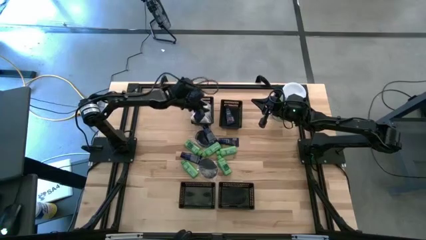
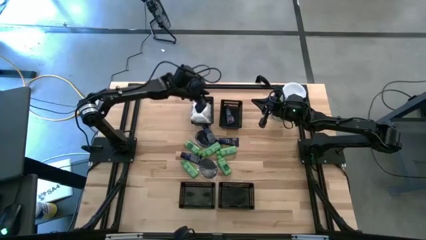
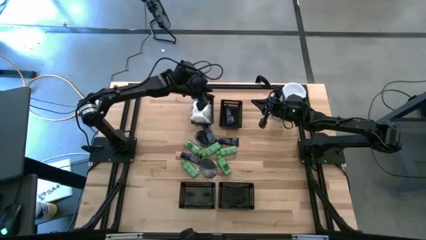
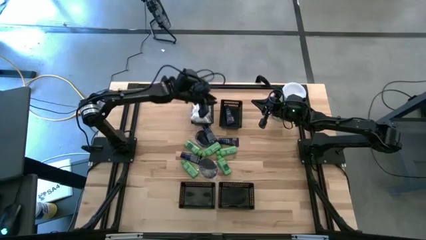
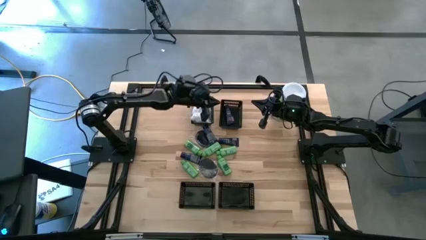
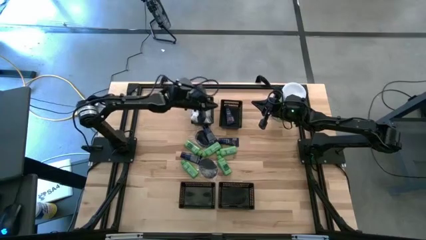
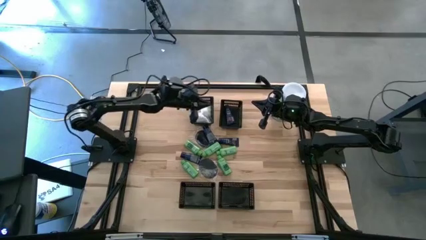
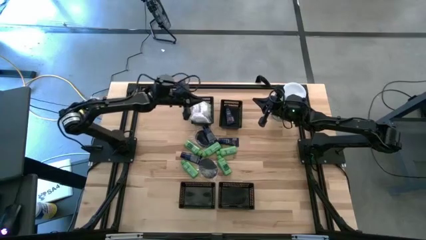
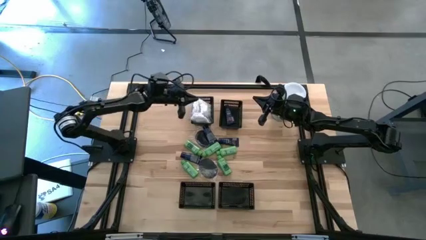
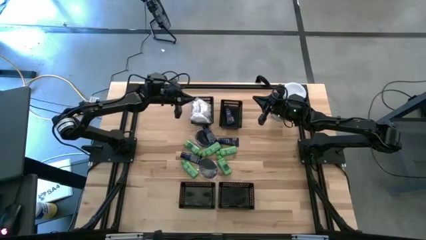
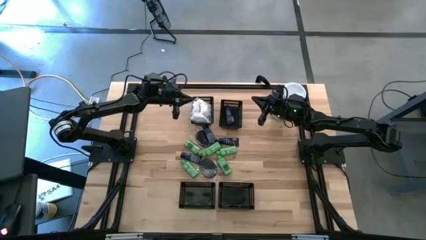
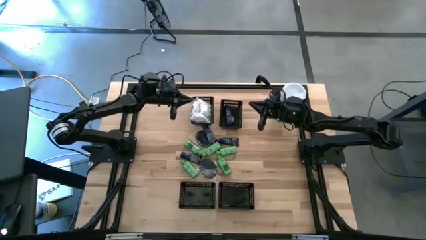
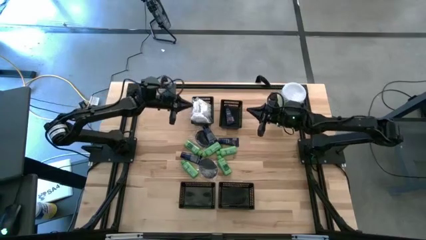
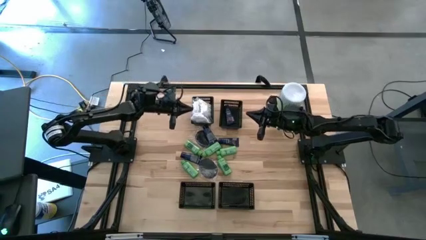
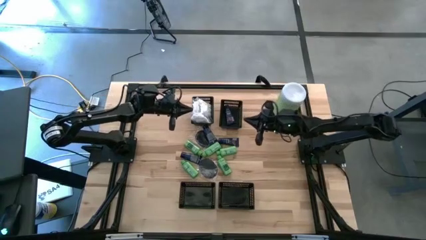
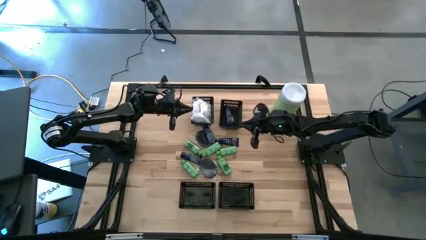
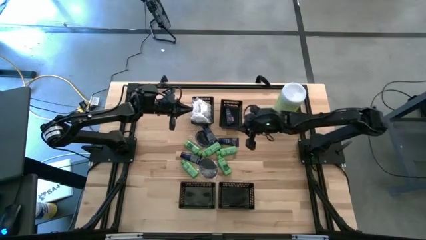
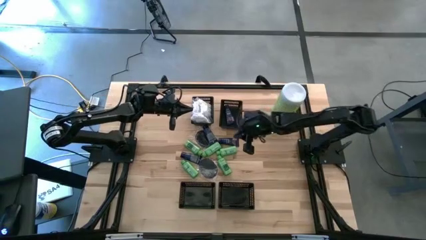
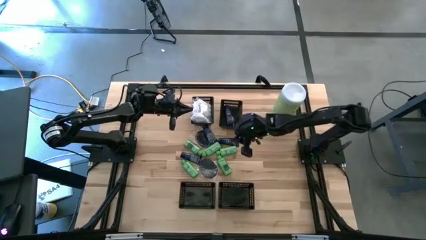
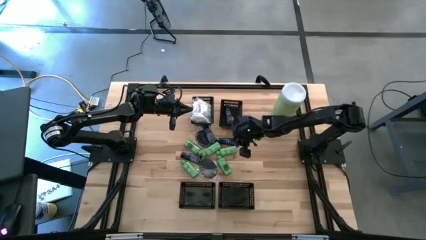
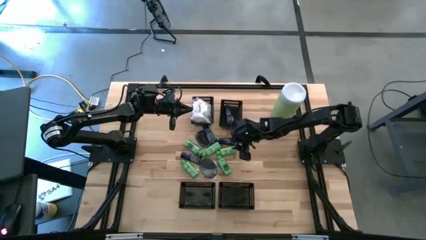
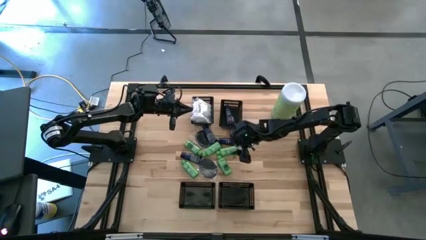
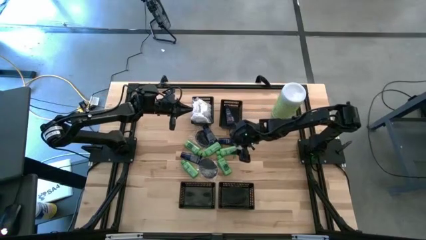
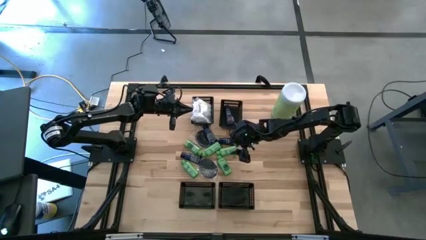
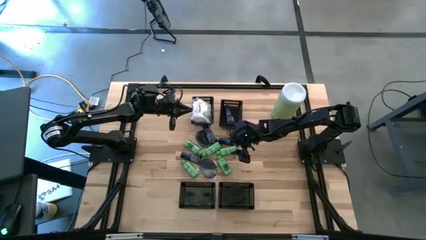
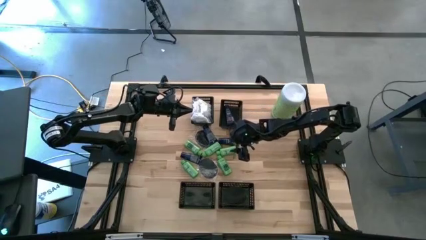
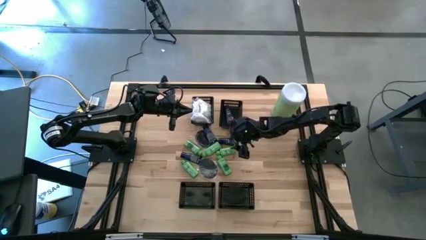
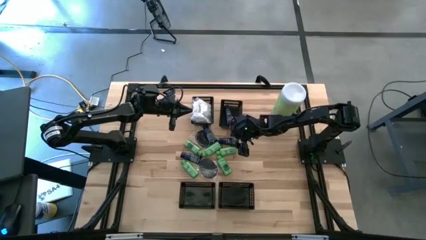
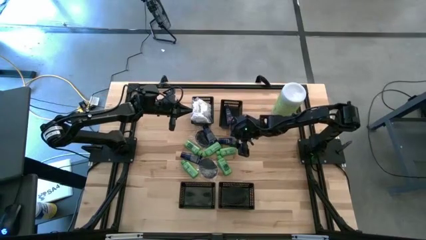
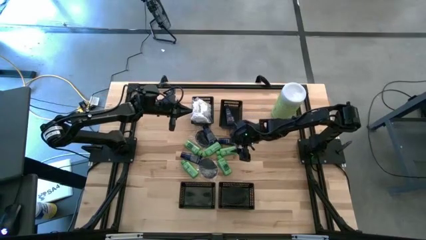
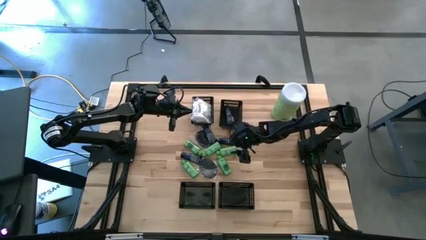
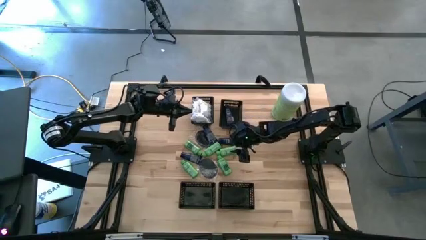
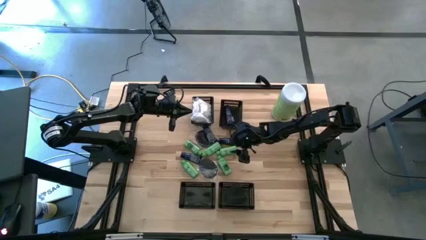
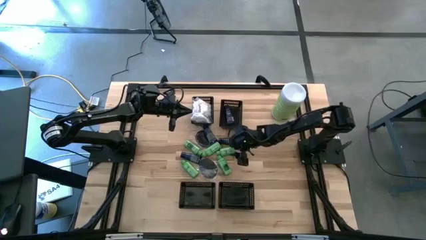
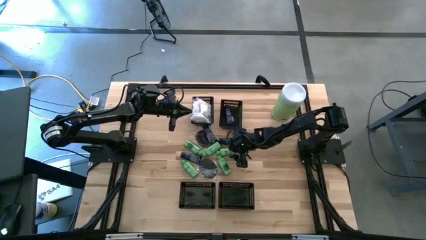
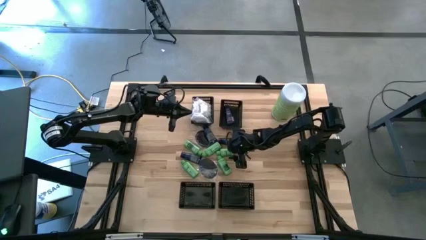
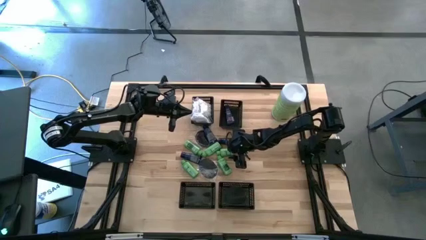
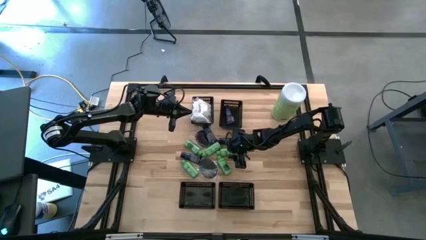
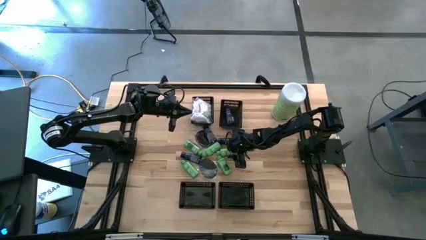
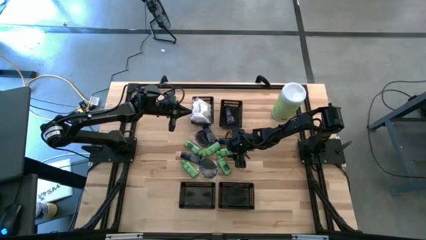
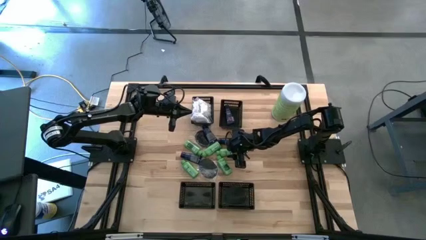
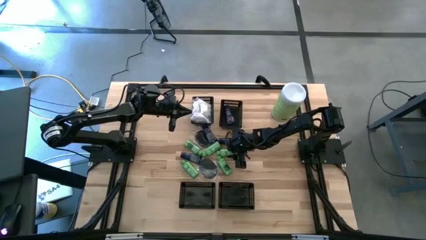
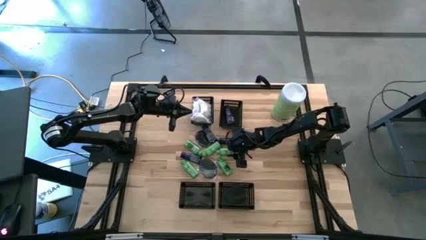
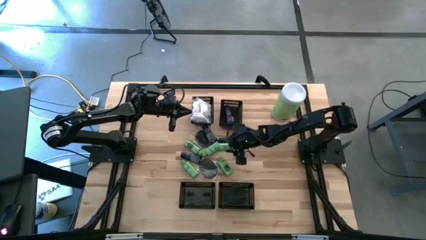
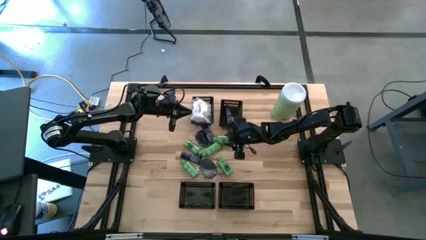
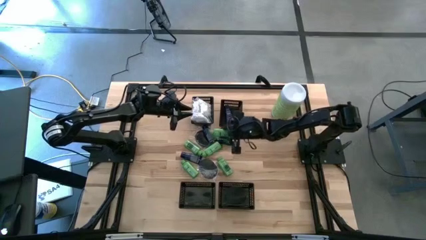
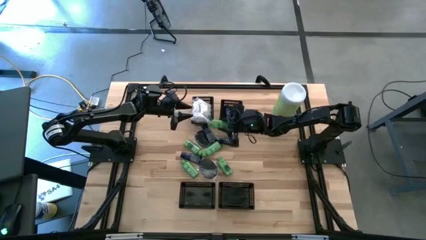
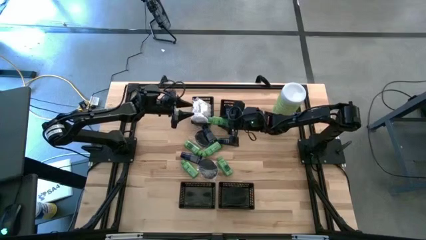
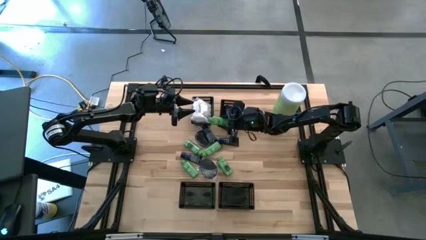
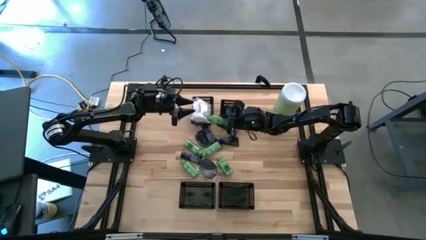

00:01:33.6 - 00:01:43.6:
Task: Pick & Place Travel size toiletries
Put the green shampoo into the bottom left black bin

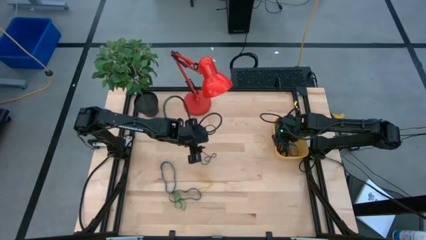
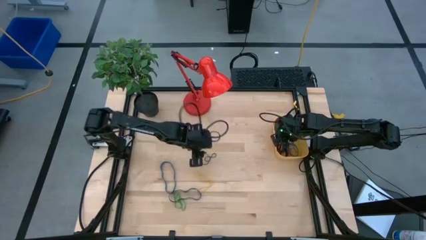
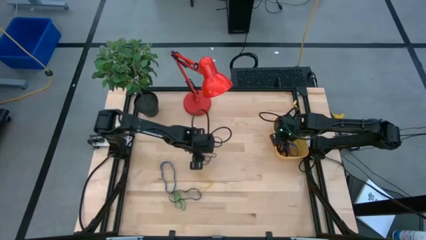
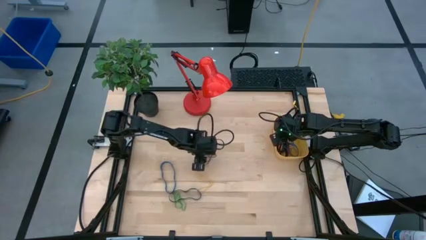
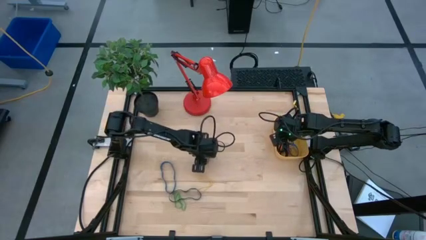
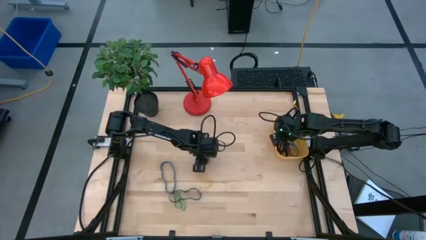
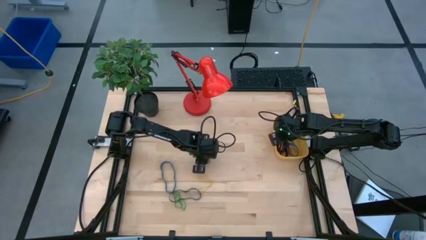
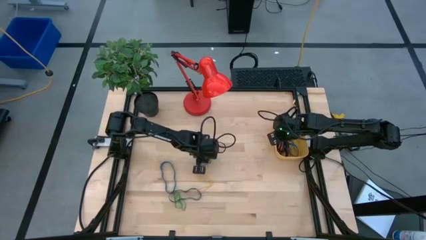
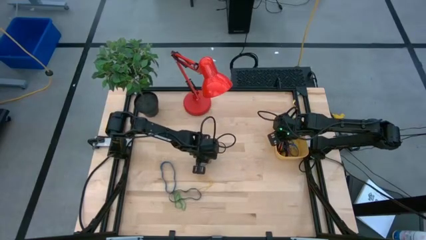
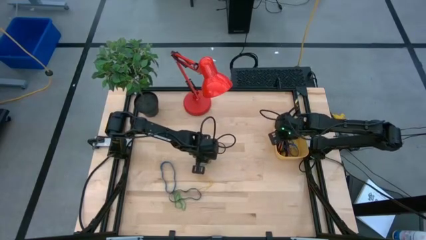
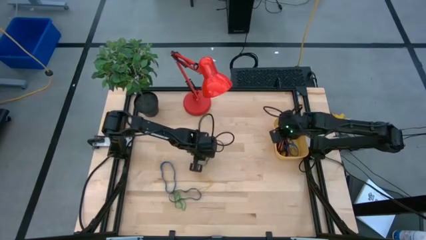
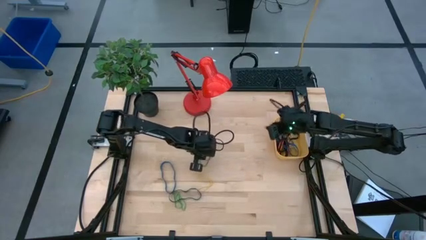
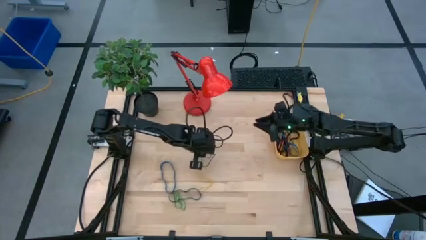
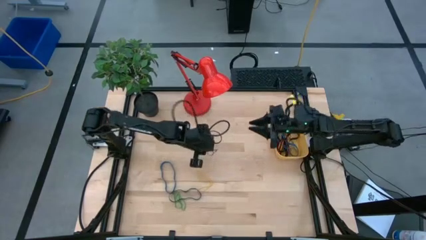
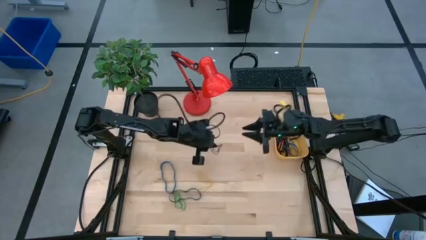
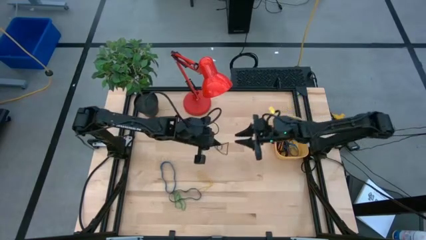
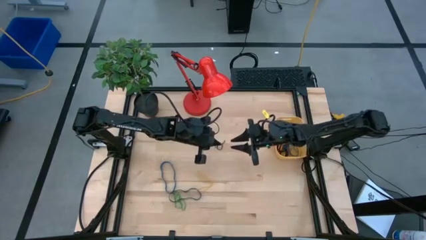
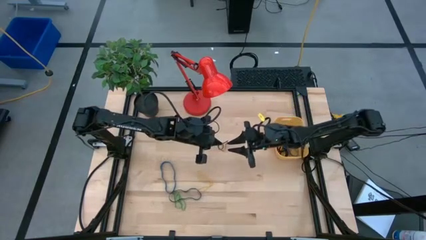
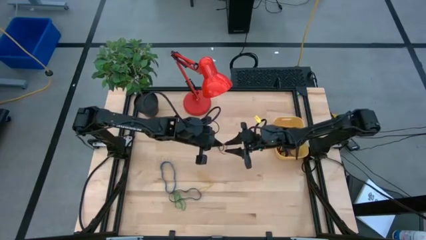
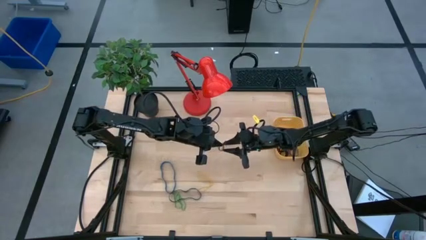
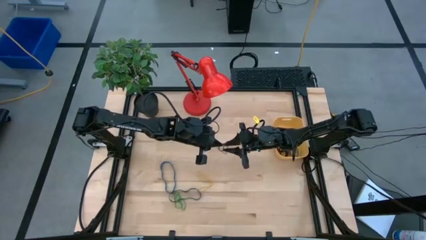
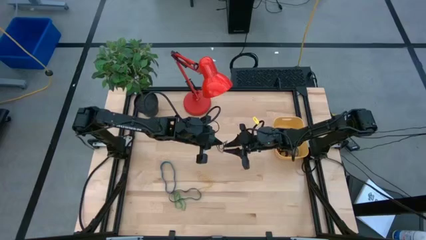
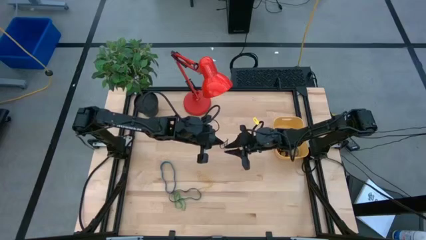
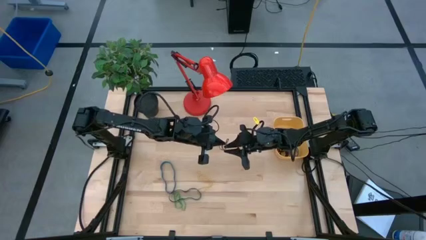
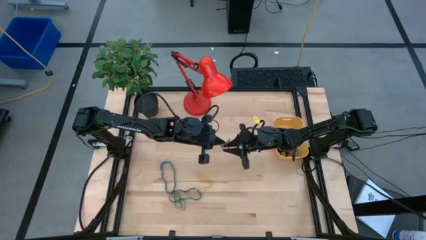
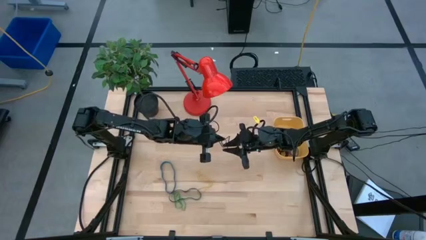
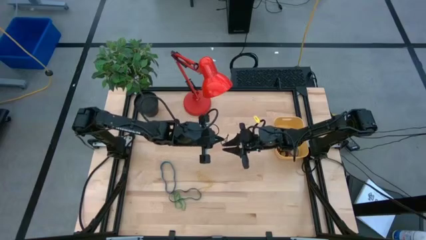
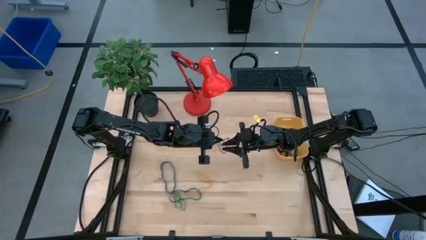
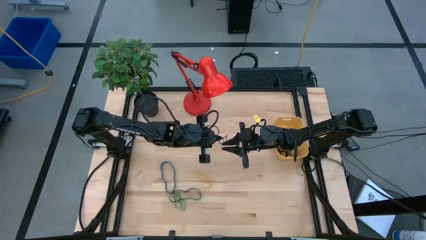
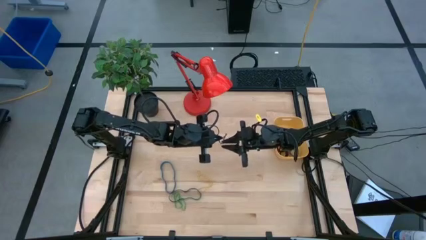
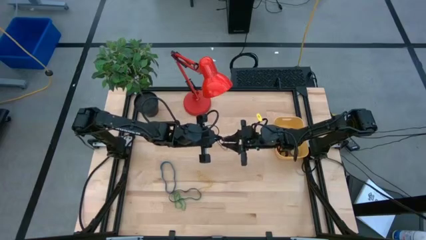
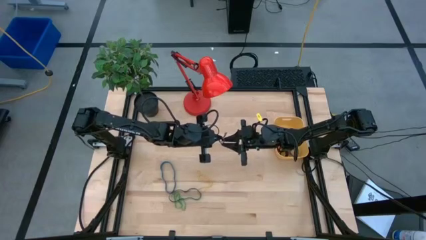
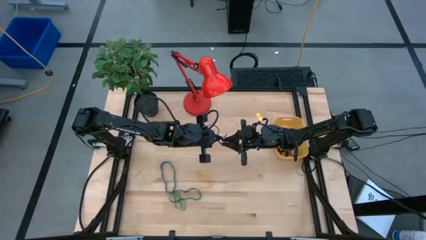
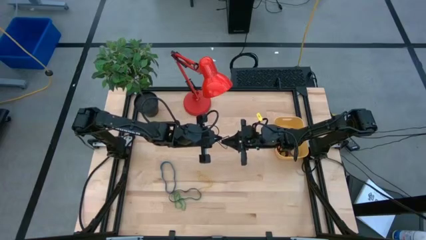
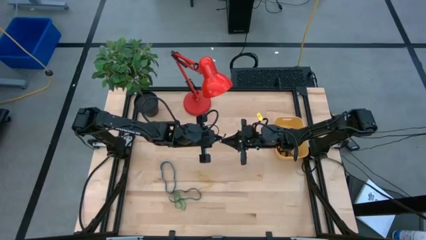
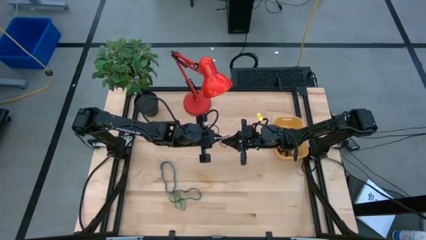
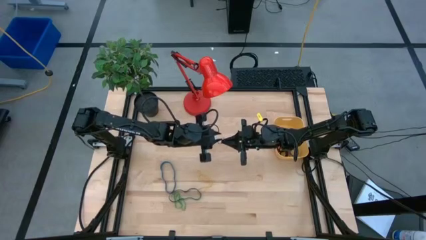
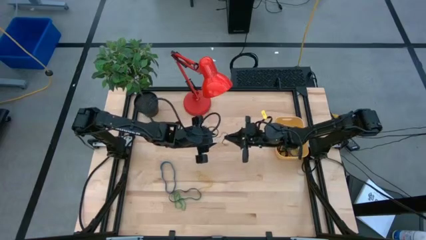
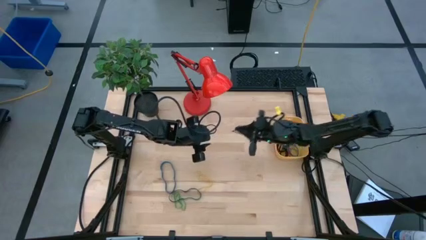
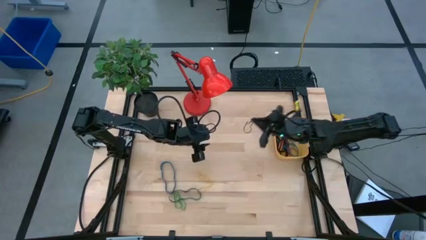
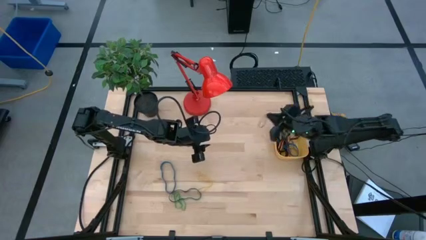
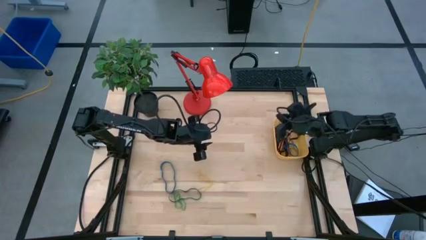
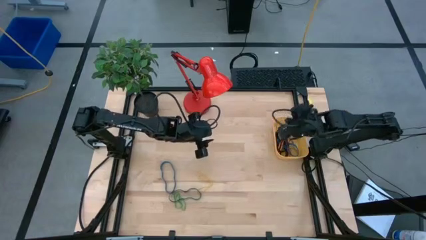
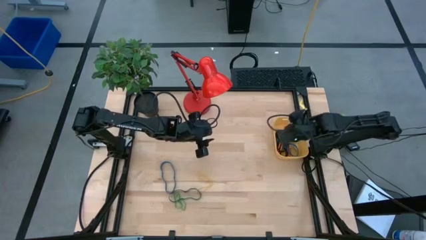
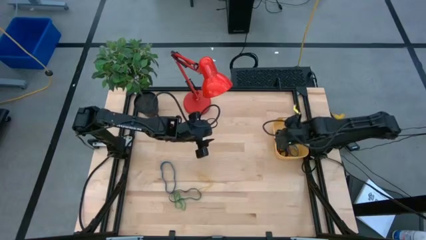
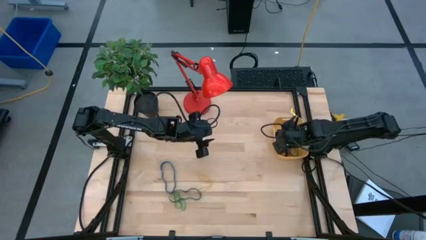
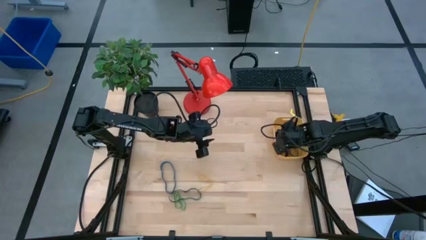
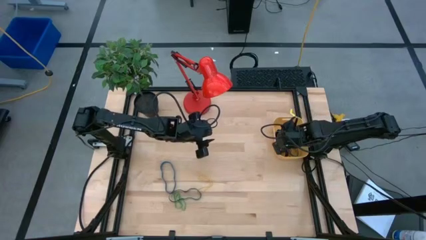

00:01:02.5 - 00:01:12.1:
Task: Pick and place rubber bands into bin
Put the violet rubber band into the yellow bin
